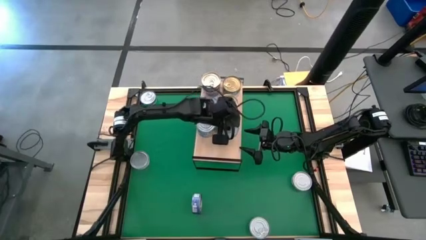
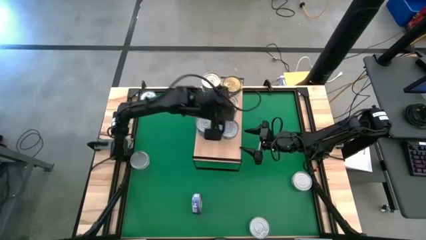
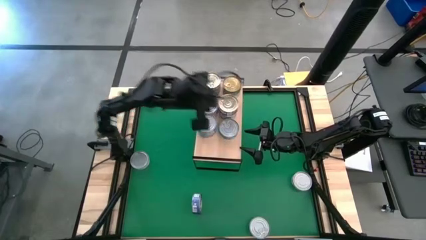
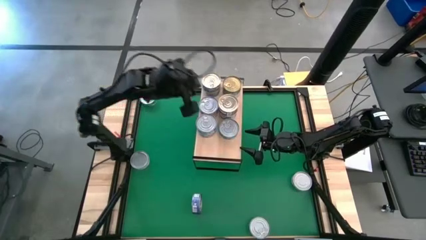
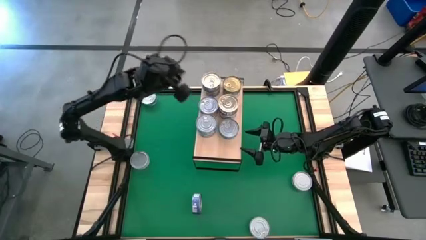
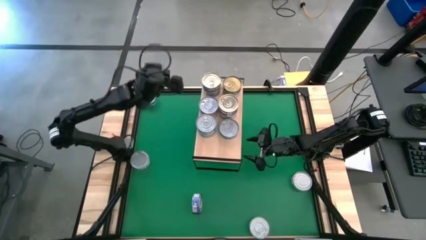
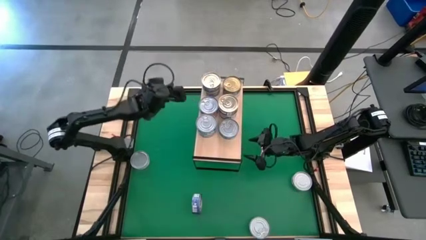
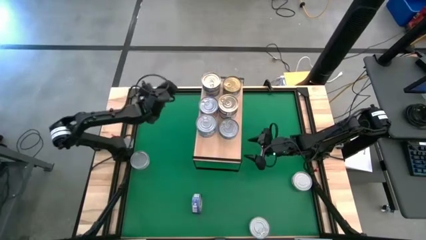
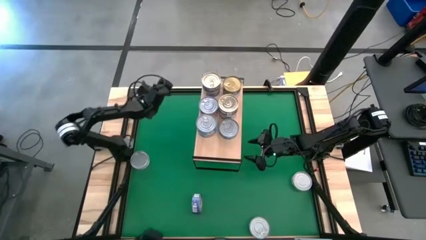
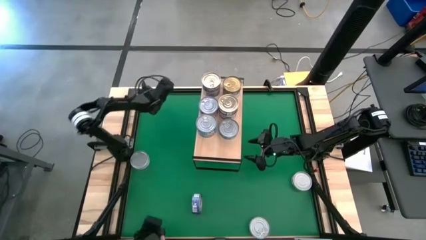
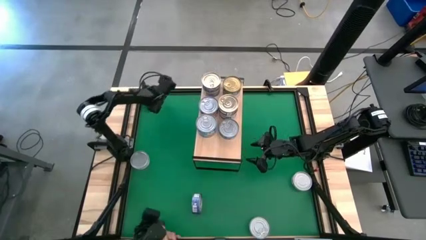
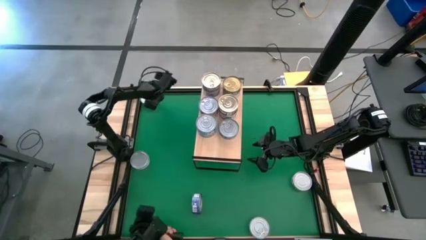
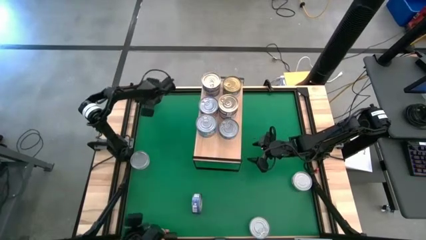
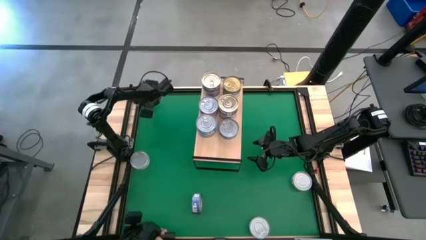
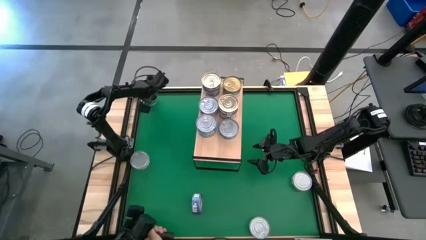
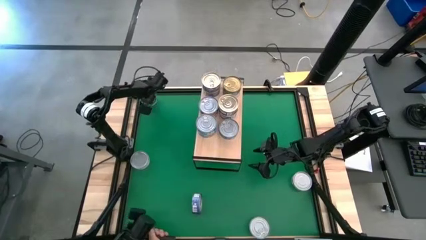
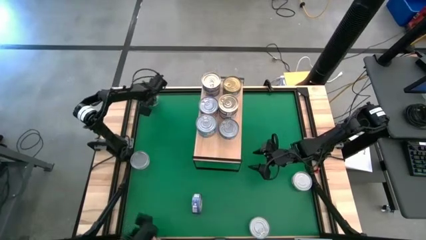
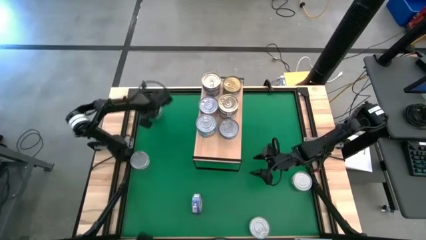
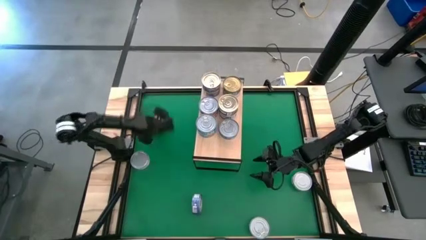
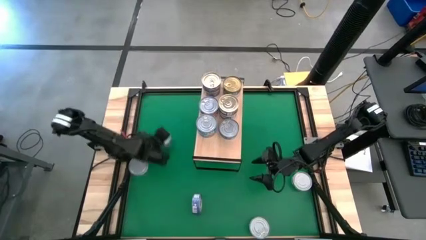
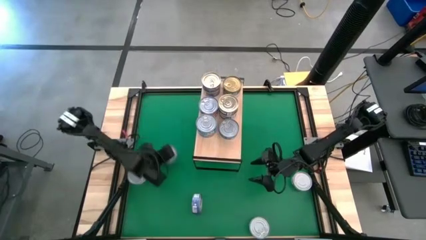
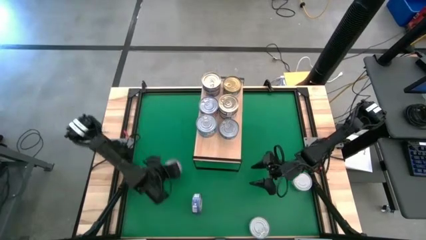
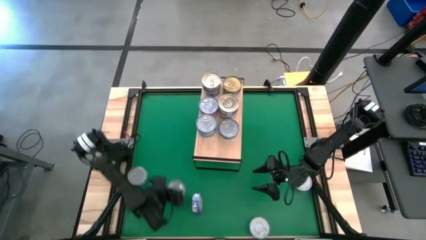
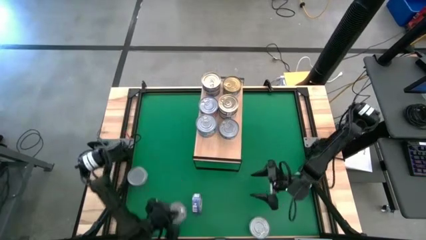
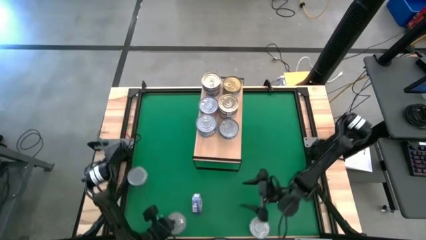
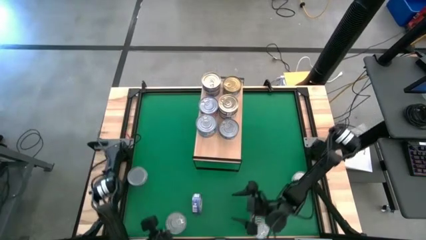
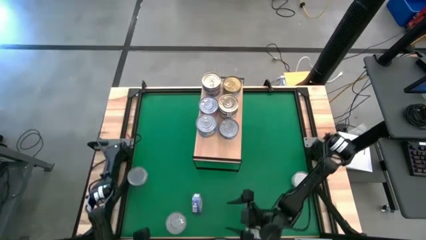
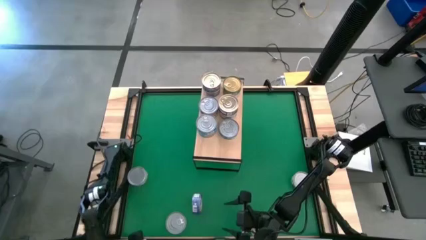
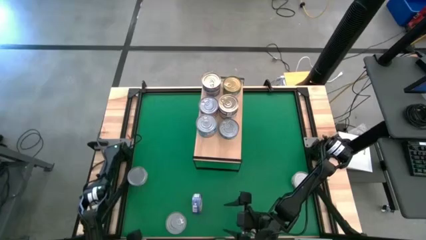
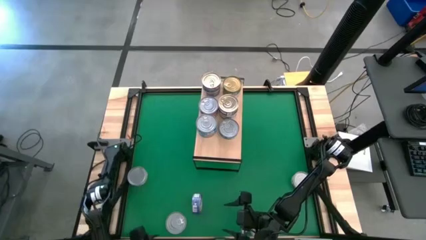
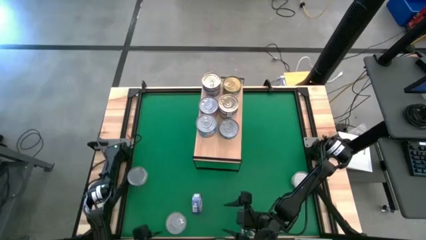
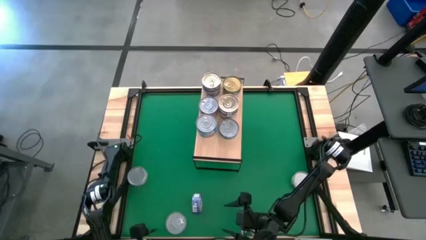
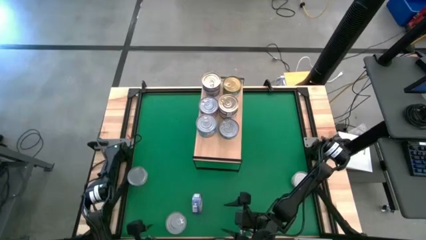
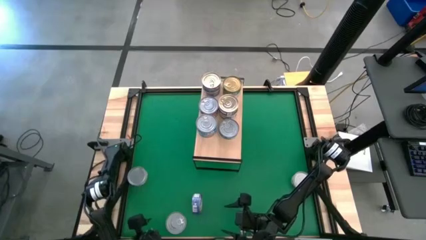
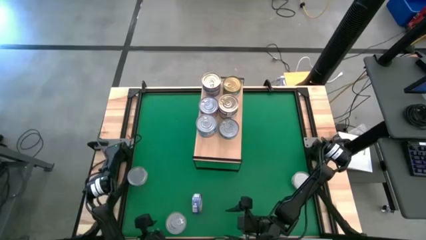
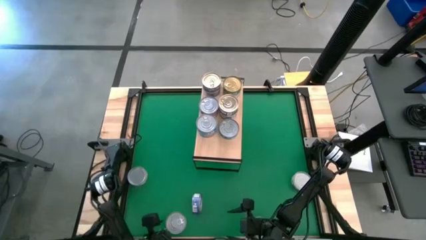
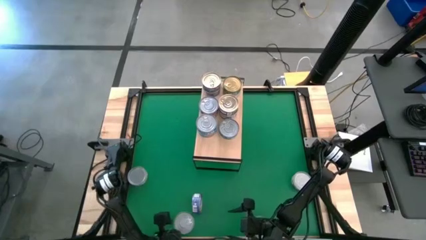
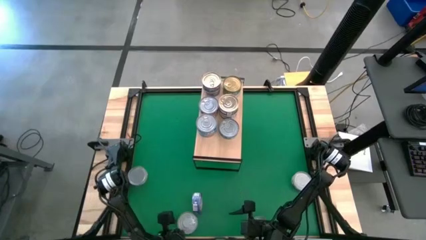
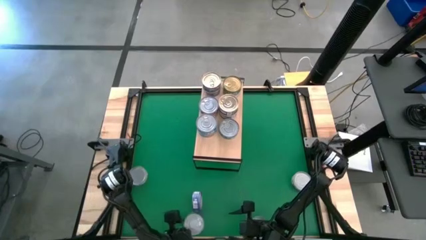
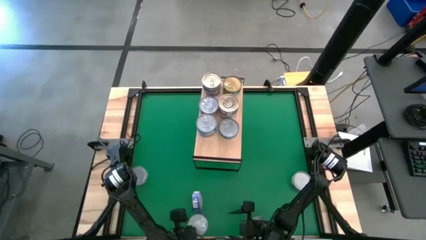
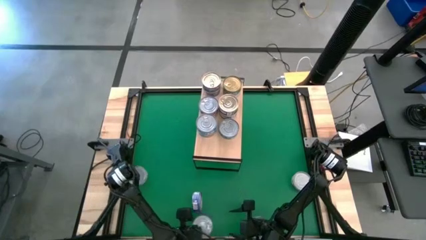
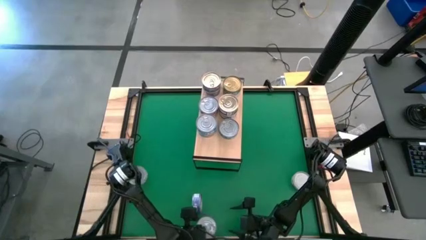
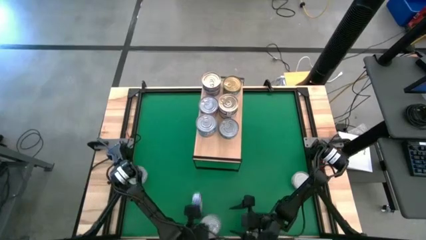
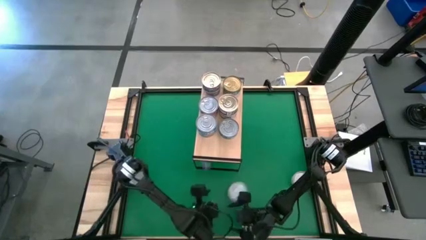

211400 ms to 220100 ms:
Task: Stack canned seafood by type on shelf
Stack the green blue tuna can on top of the other green blue can on the shelf

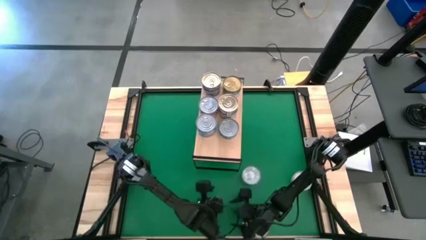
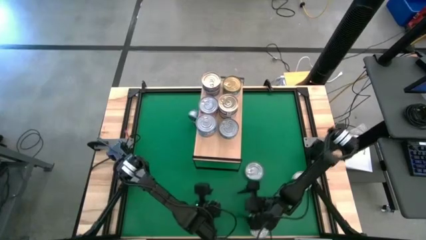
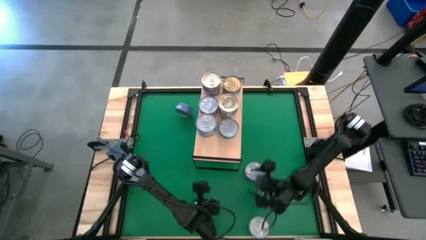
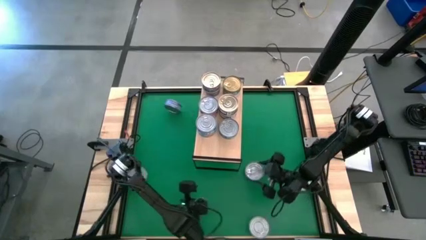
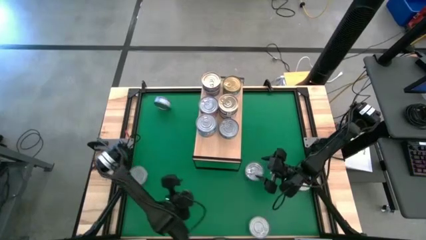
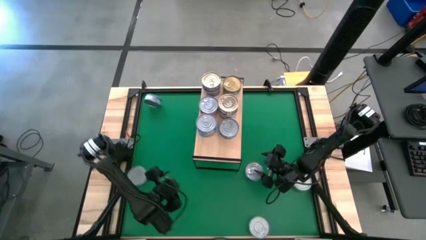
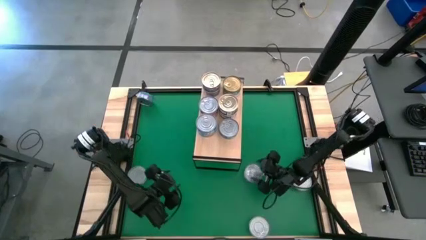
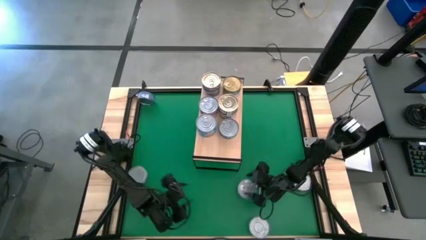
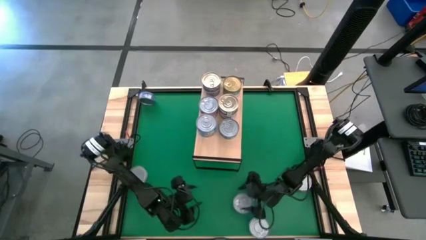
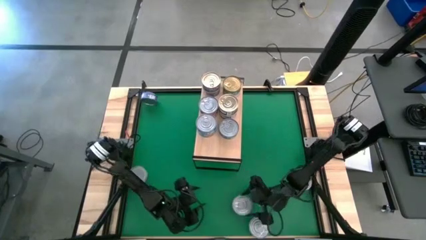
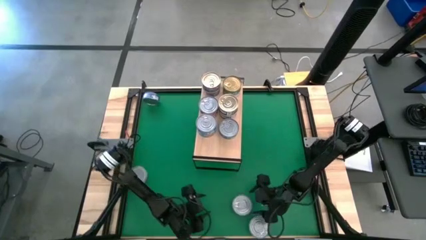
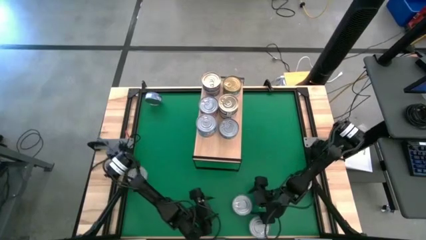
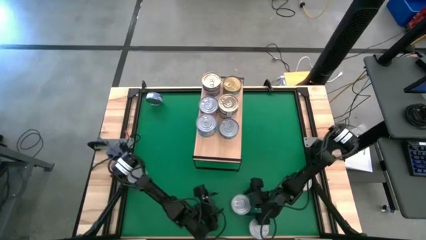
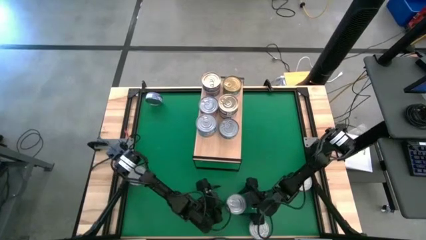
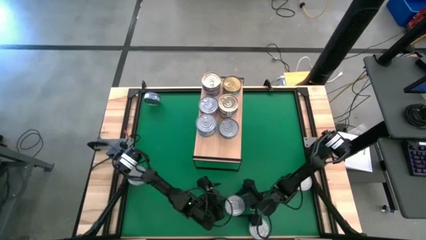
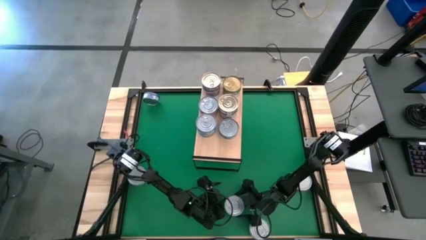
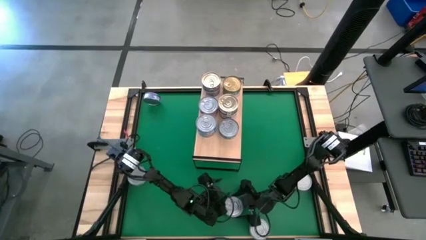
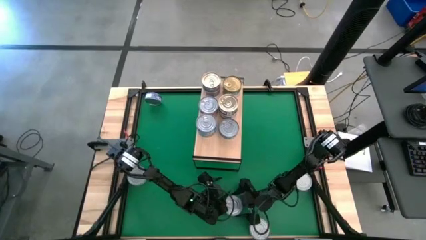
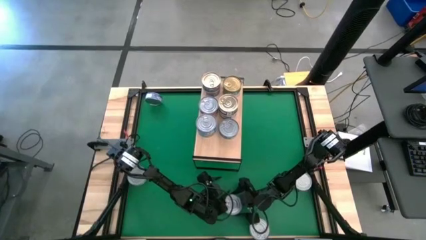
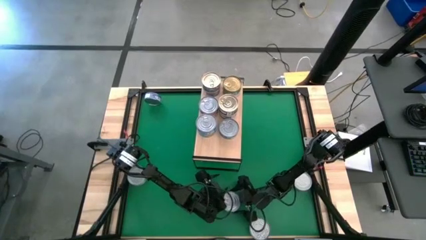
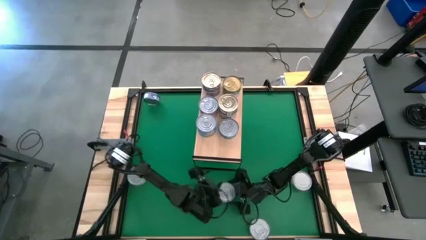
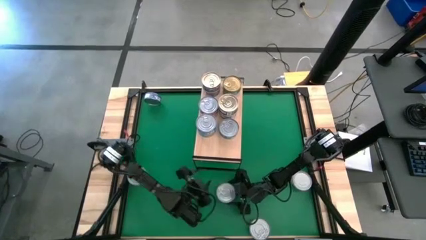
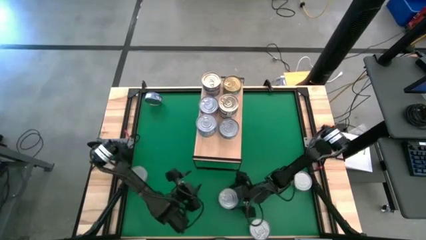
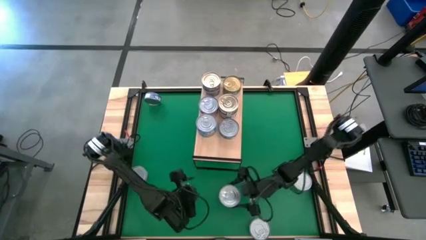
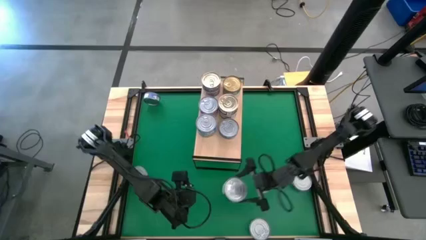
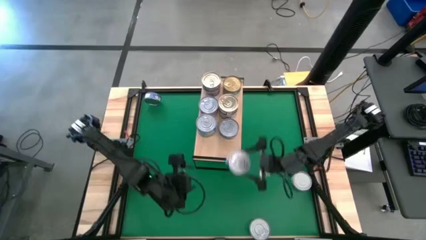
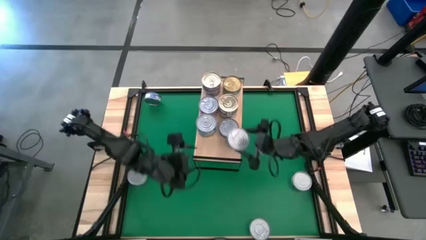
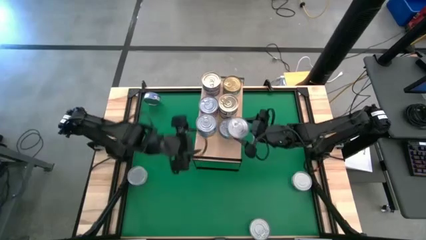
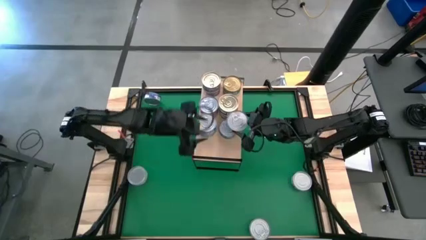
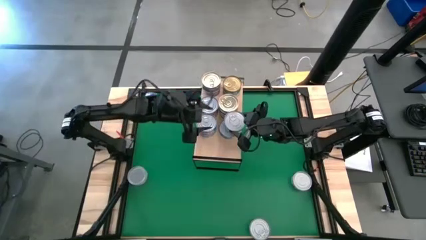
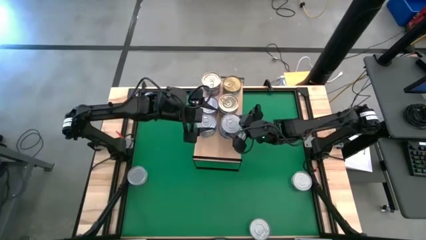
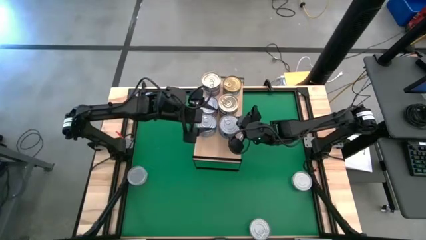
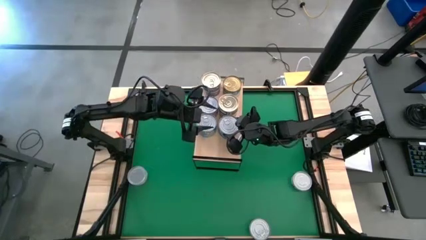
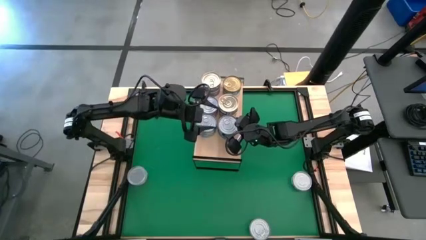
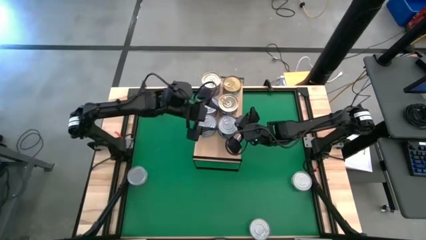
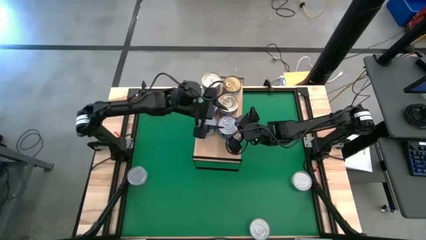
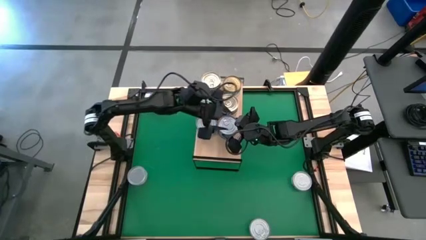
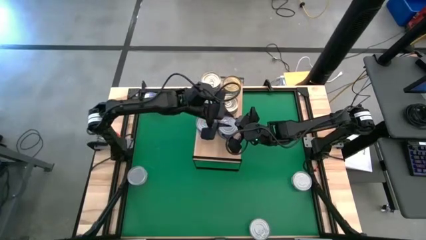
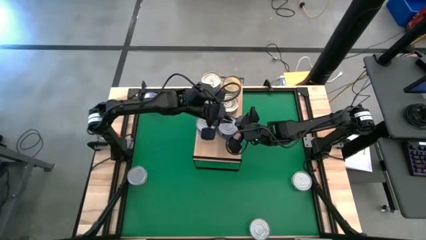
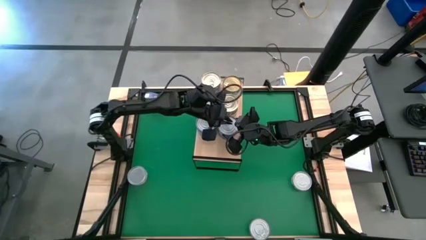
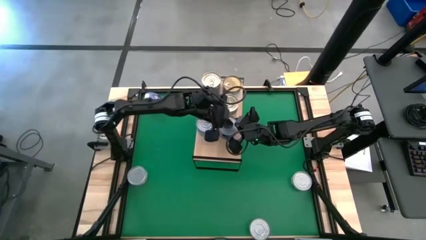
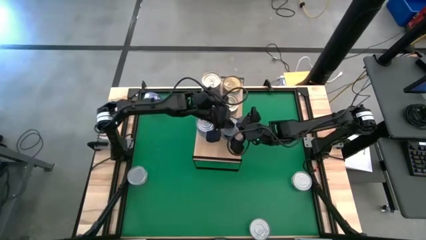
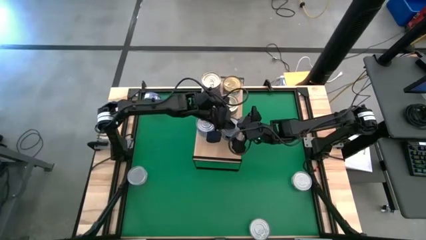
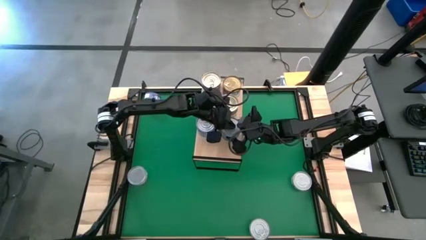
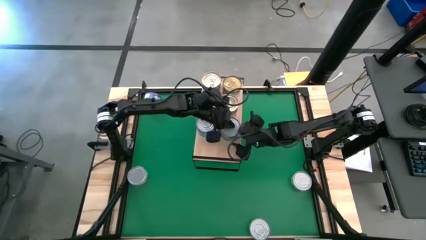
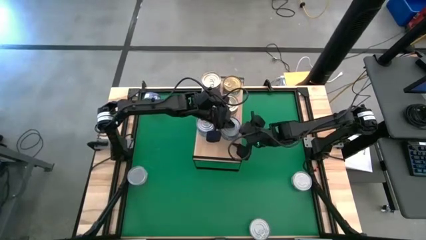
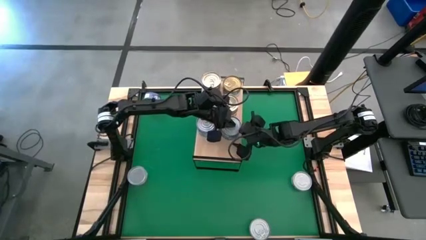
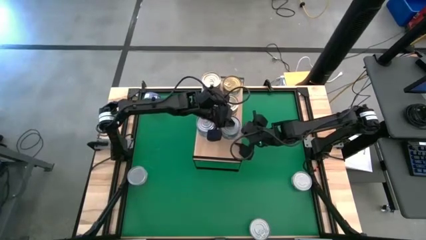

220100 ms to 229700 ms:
Stack the green blue tuna can on top of the other green blue can on the shelf
